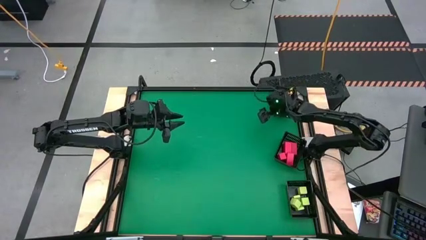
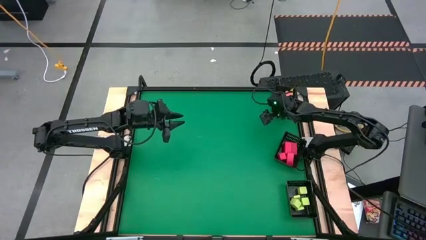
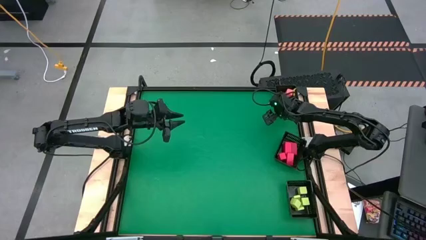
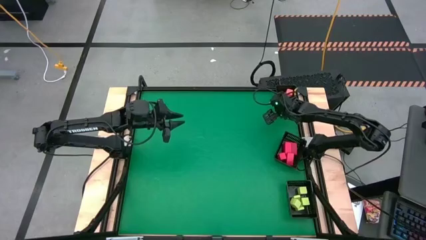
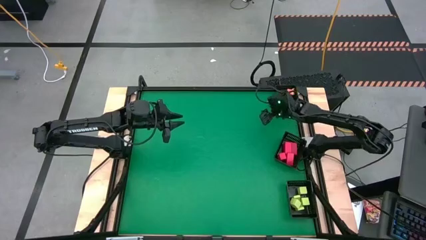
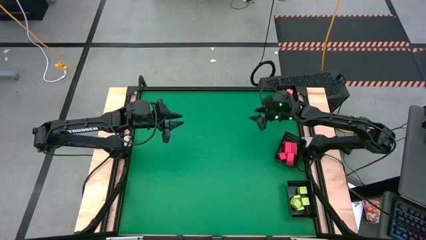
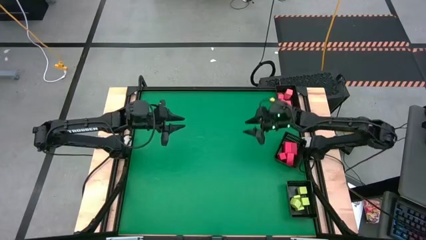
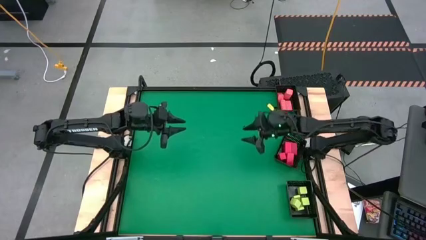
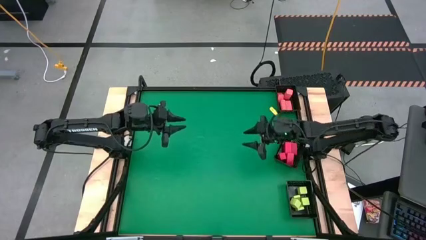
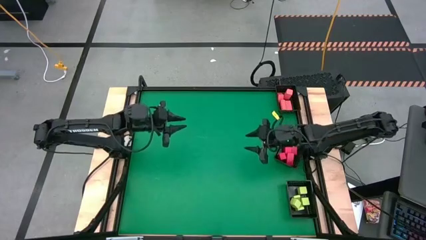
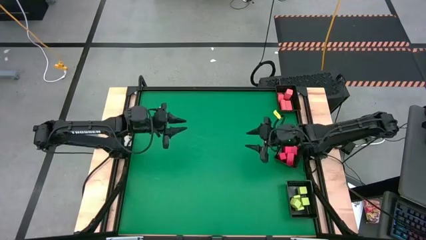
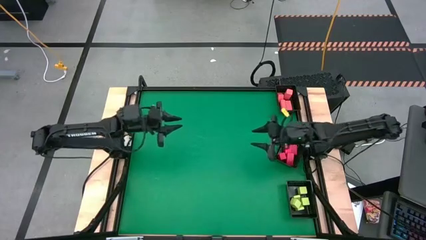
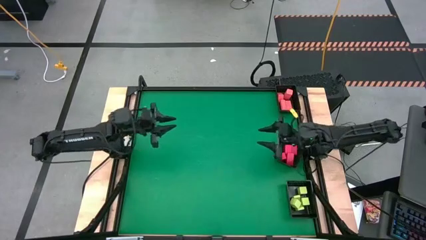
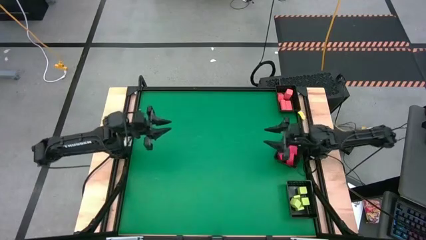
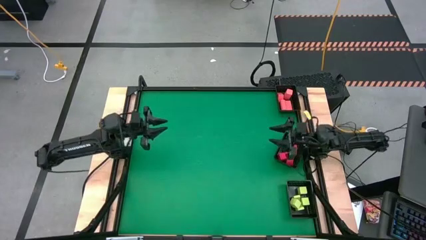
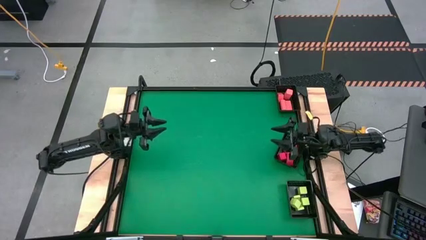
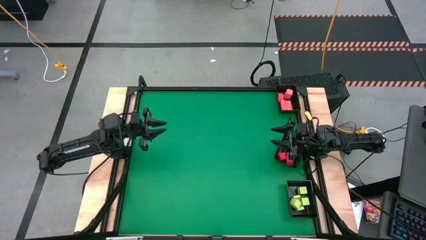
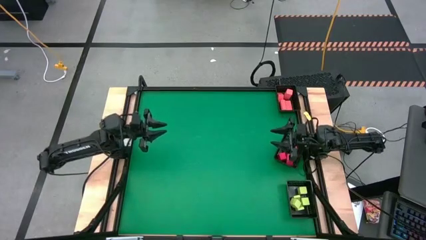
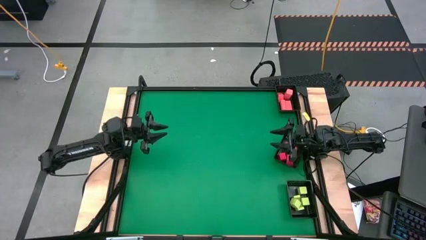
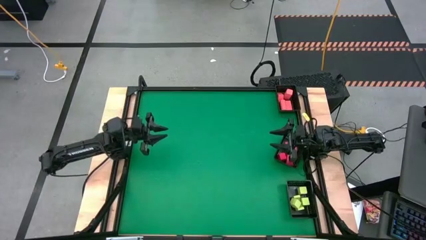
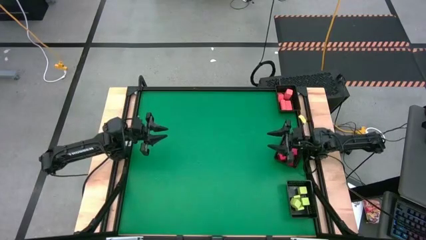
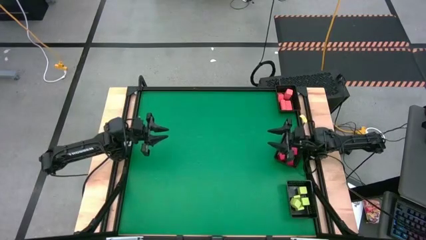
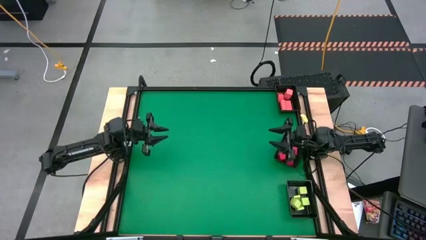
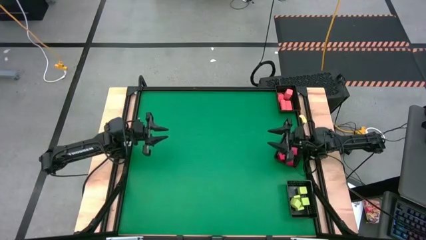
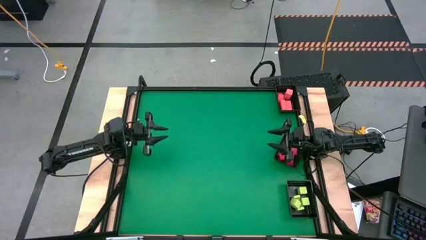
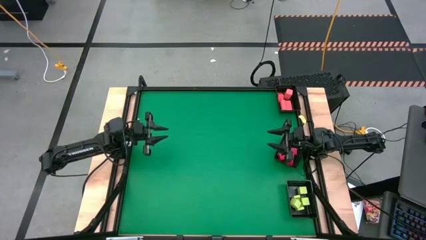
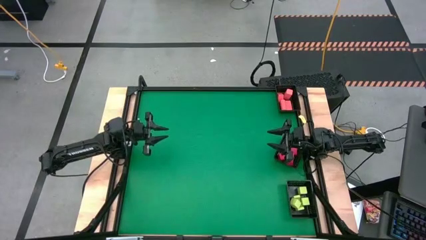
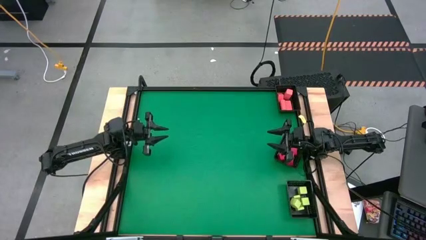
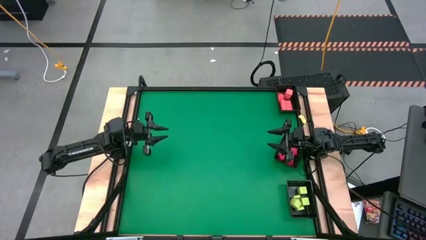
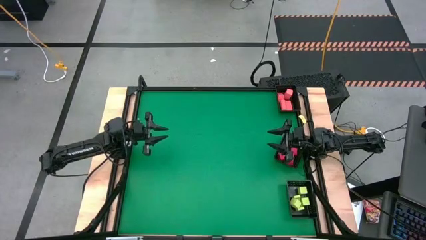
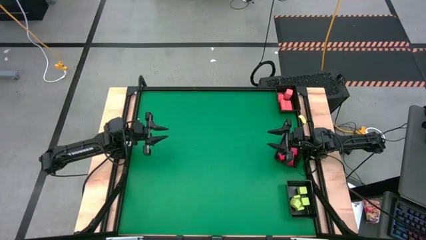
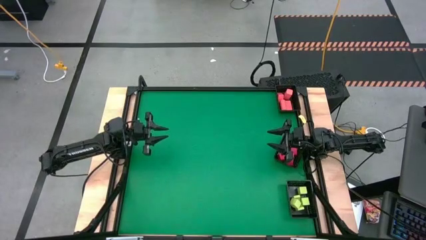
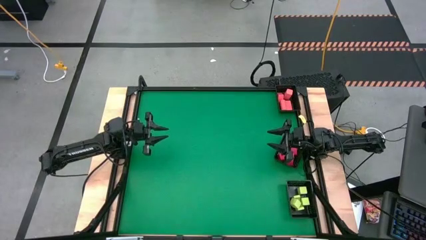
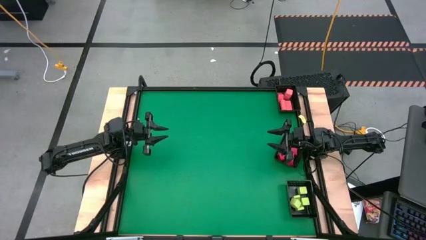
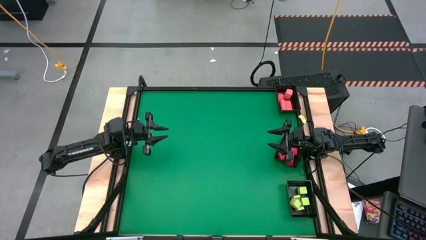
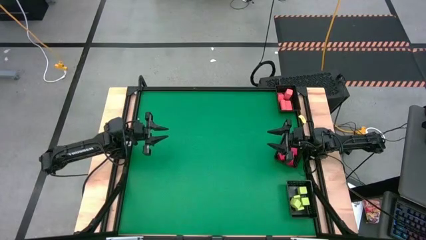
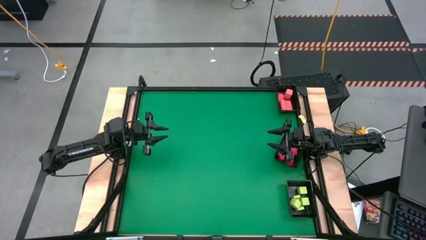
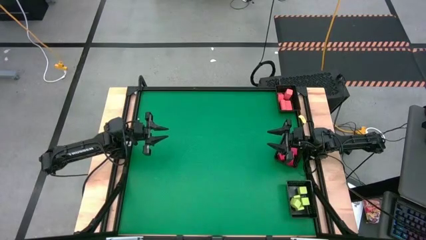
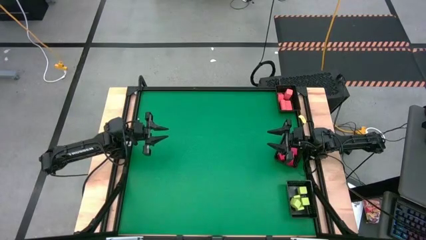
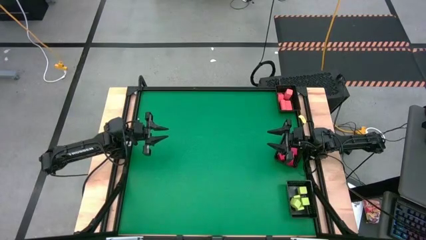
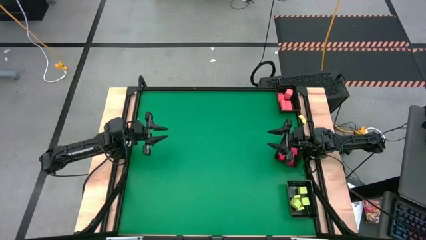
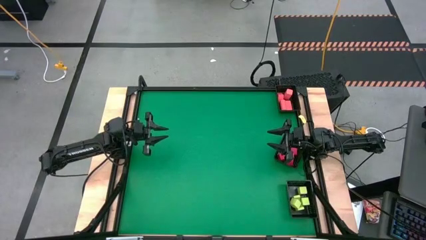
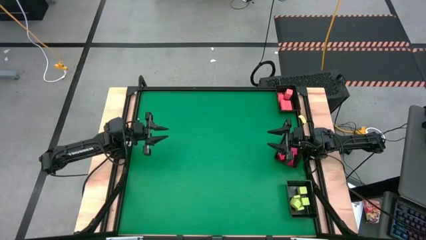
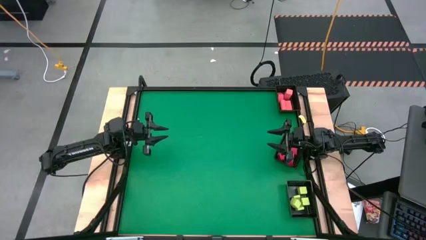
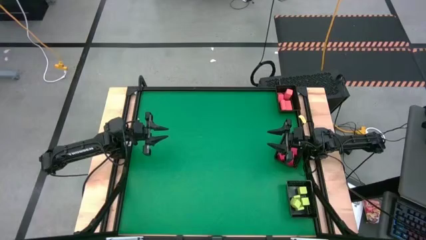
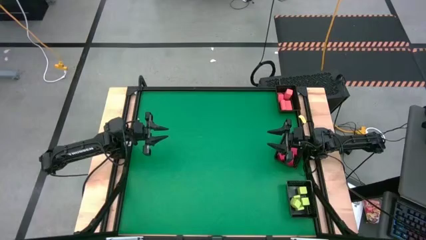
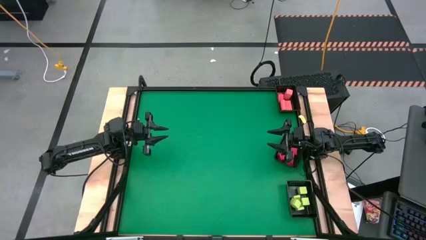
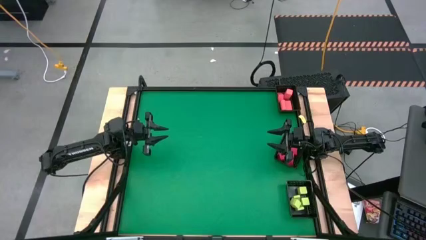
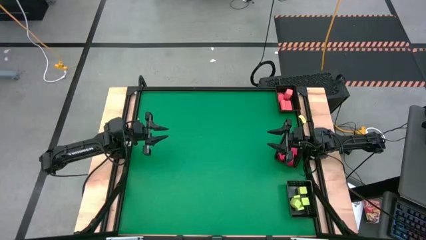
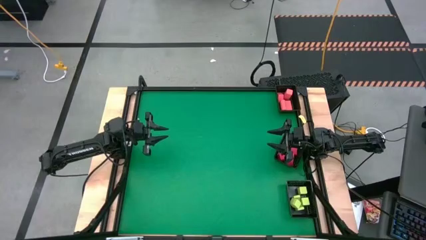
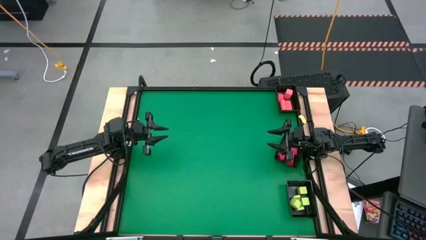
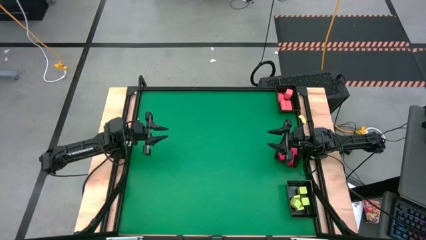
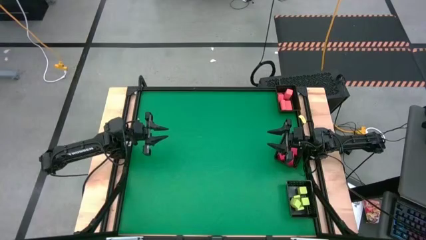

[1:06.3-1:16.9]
Task: Sort & place blocks by color
Return to Home Position

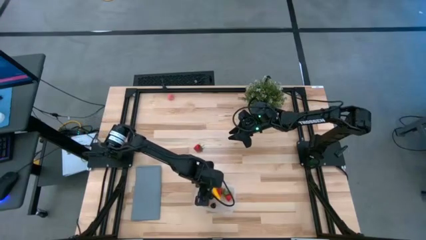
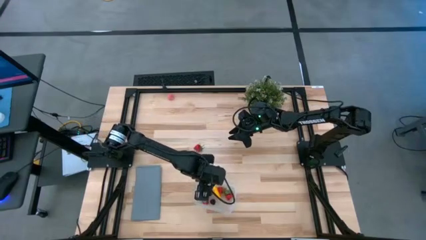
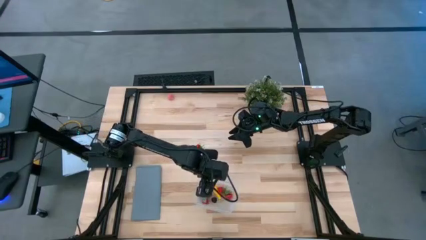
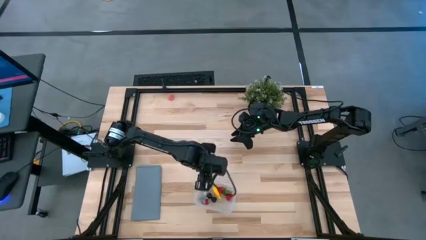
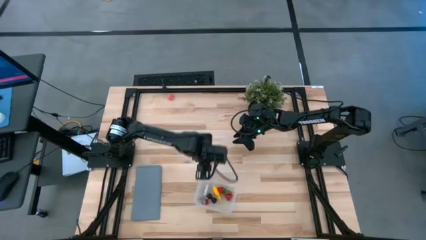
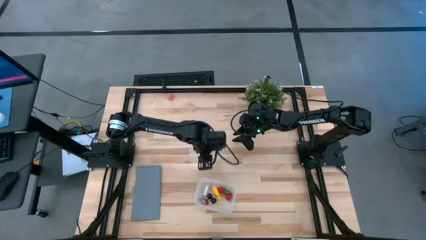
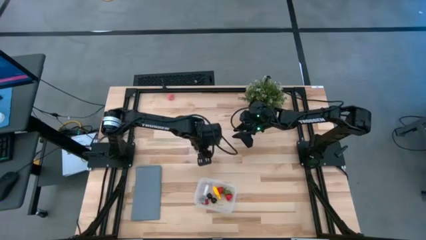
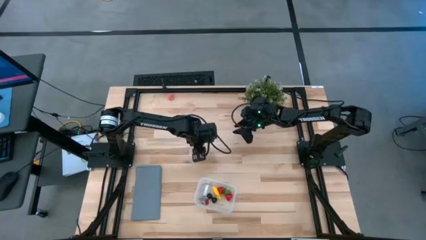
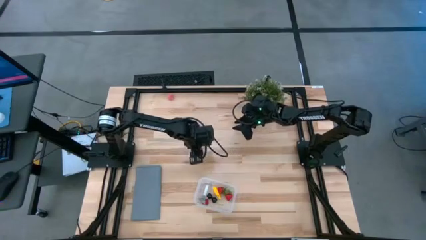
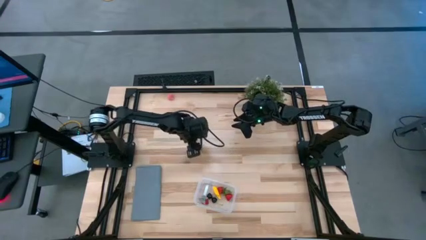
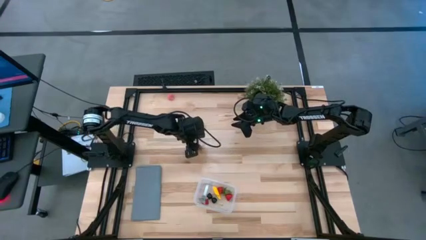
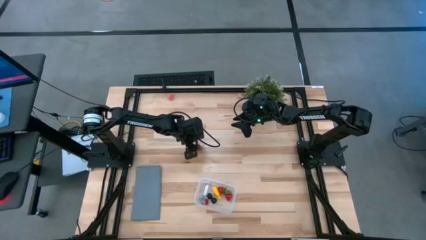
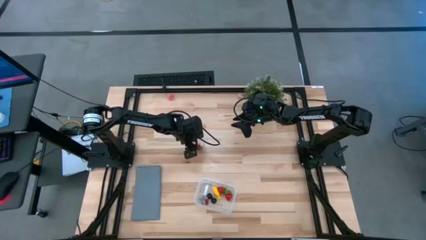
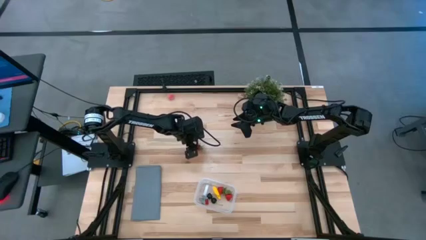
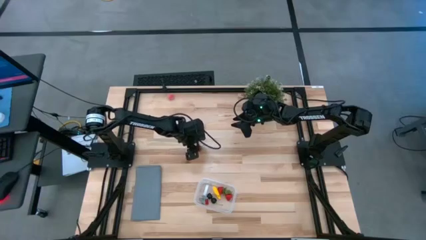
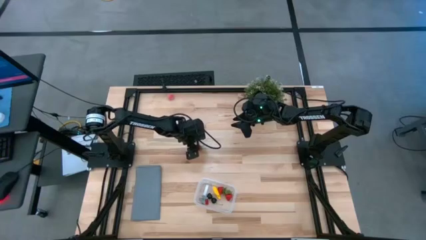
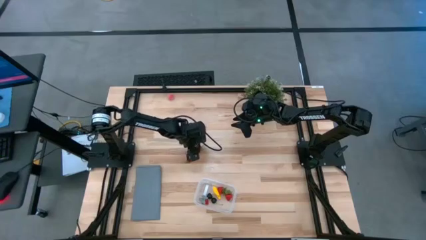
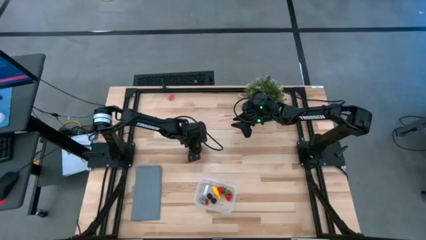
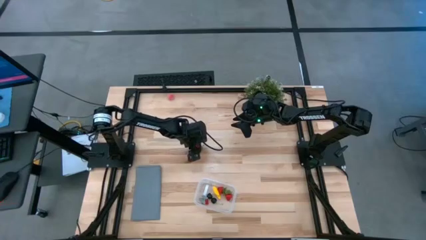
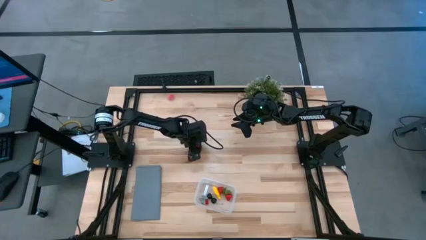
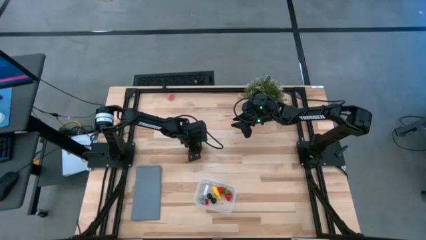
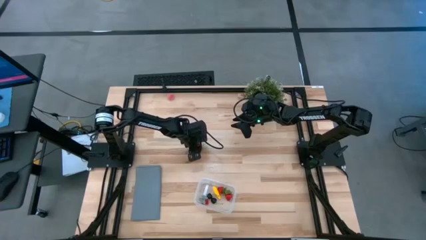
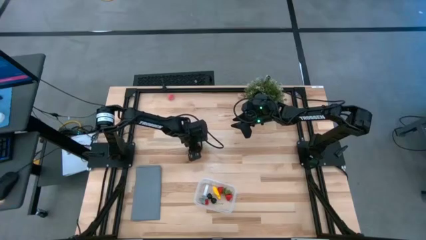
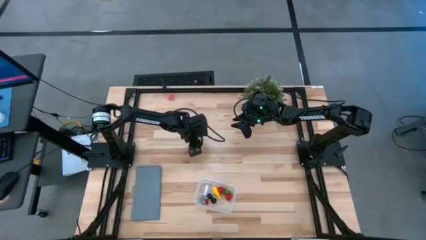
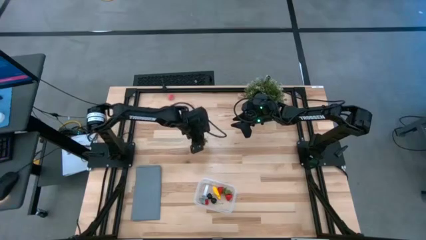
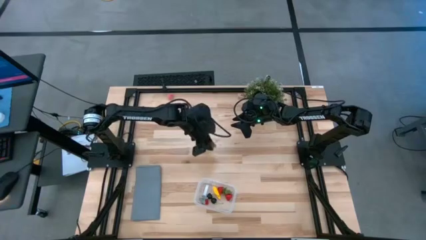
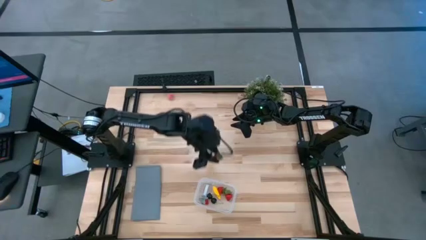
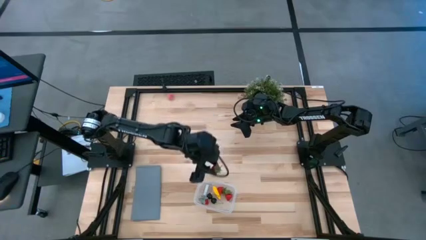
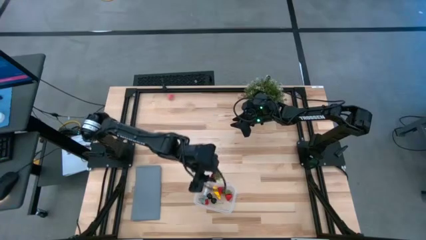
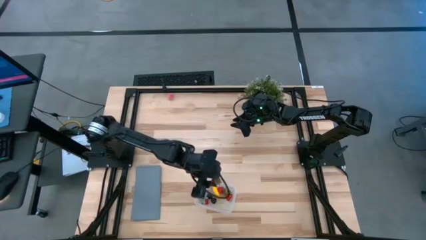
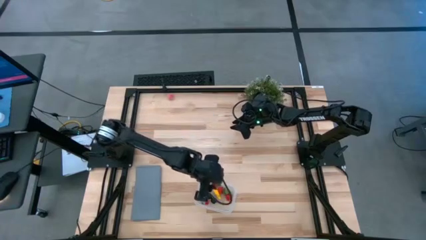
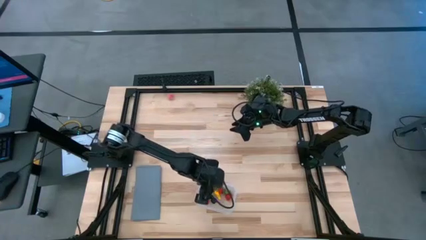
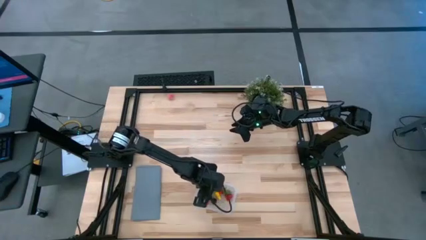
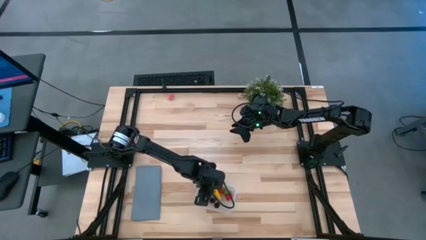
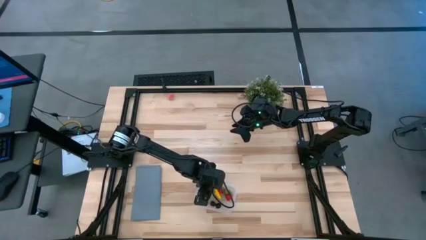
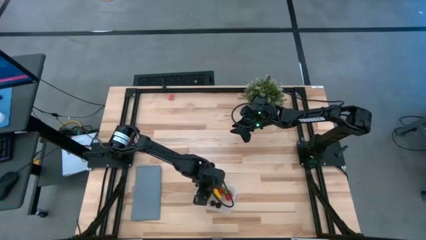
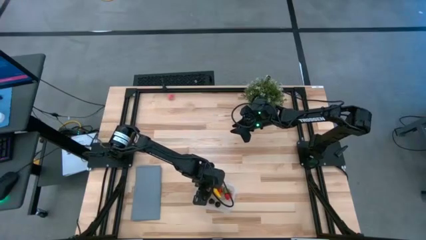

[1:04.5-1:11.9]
Task: Pick and placing Produce into tupperware
Put the red strawberry into the transparent bin
